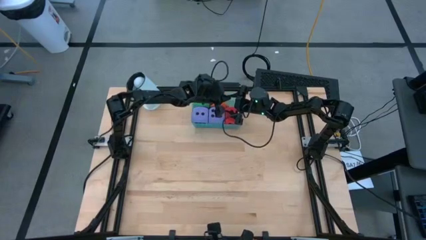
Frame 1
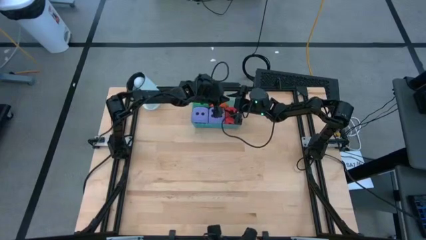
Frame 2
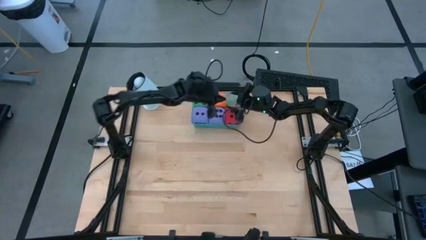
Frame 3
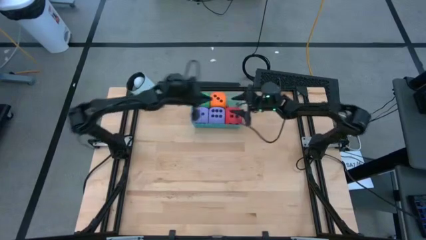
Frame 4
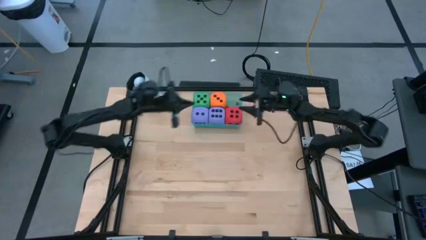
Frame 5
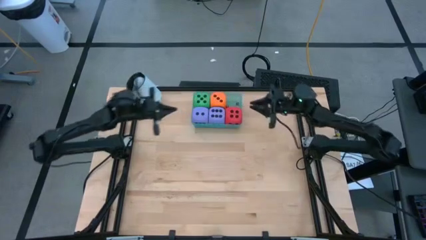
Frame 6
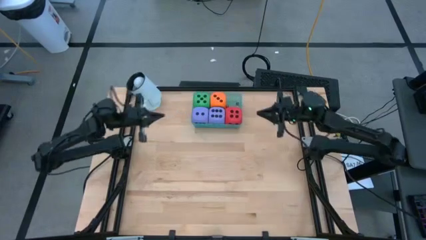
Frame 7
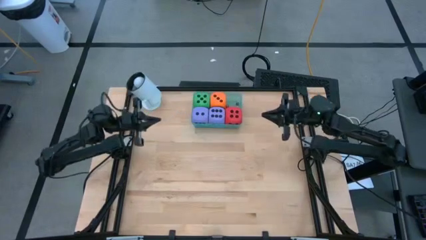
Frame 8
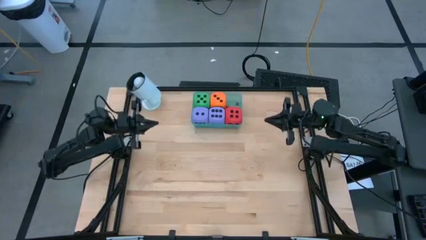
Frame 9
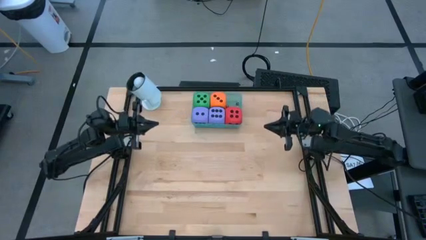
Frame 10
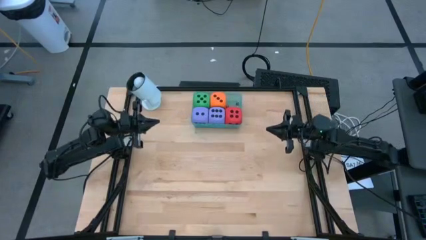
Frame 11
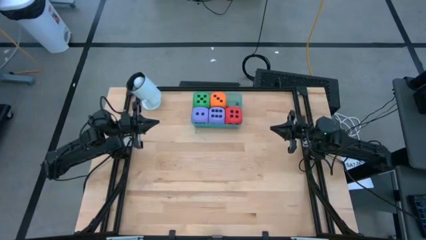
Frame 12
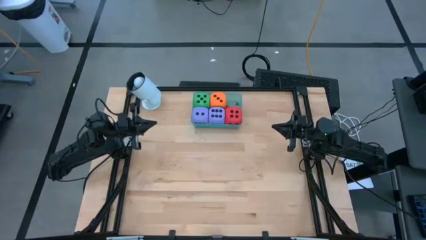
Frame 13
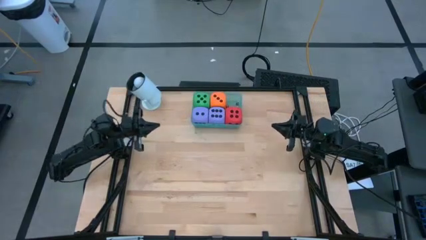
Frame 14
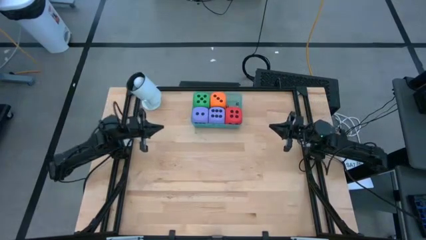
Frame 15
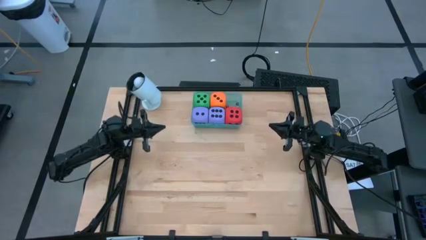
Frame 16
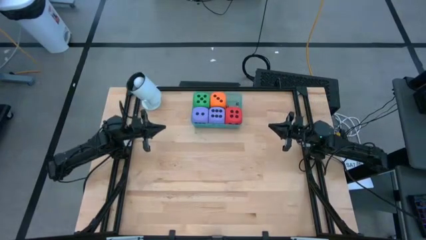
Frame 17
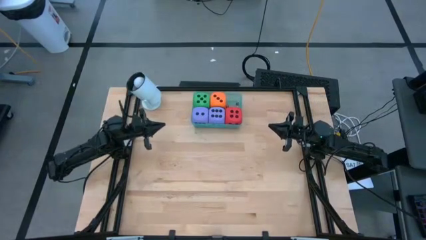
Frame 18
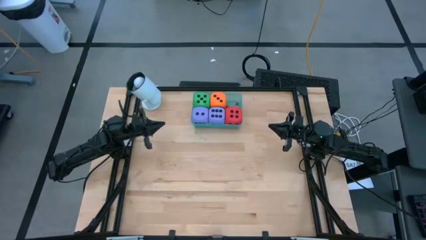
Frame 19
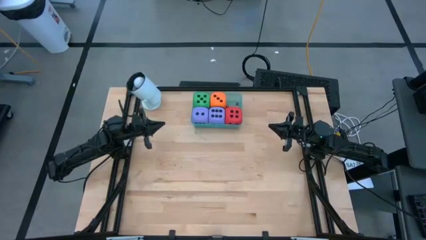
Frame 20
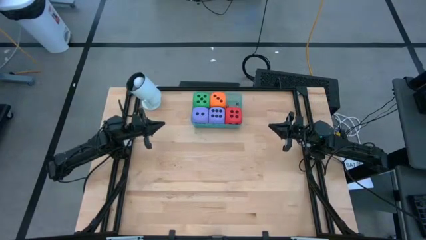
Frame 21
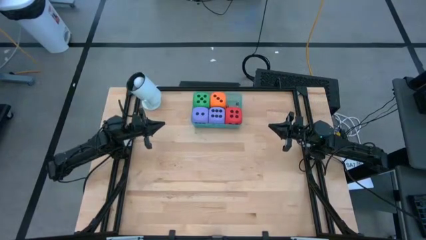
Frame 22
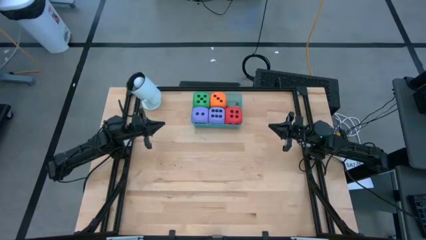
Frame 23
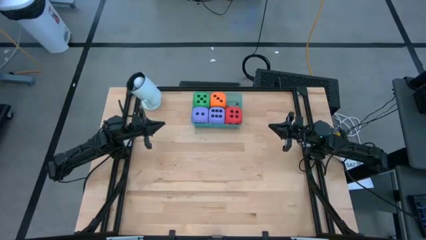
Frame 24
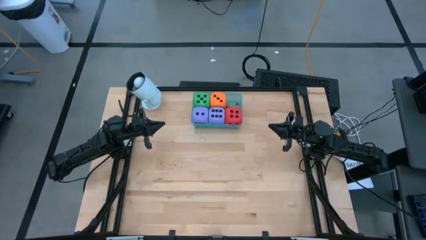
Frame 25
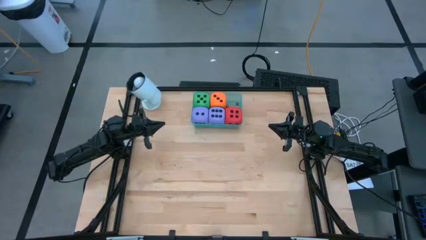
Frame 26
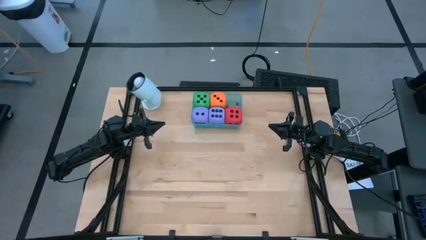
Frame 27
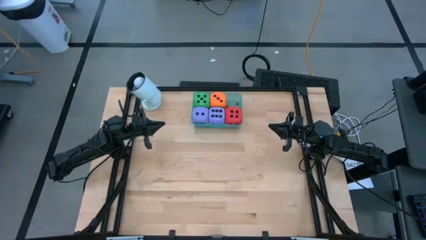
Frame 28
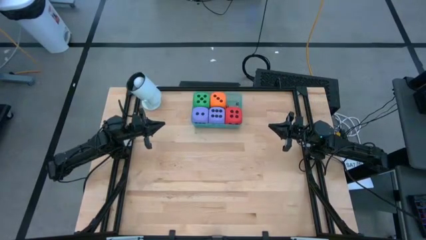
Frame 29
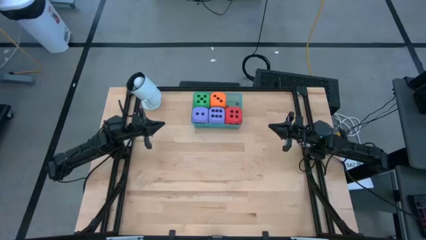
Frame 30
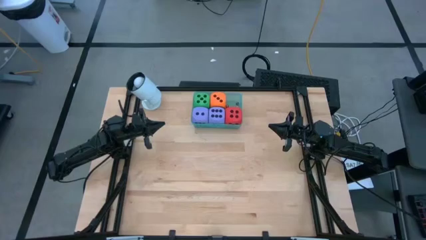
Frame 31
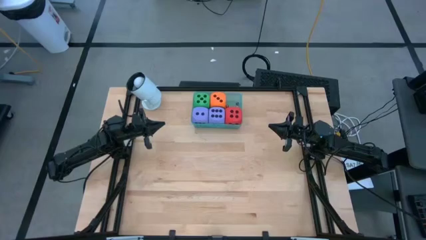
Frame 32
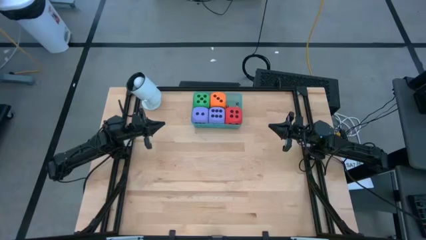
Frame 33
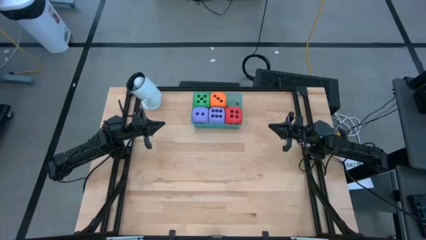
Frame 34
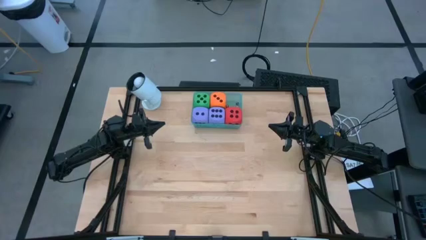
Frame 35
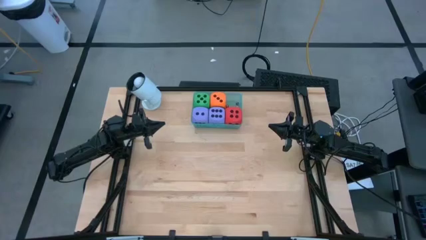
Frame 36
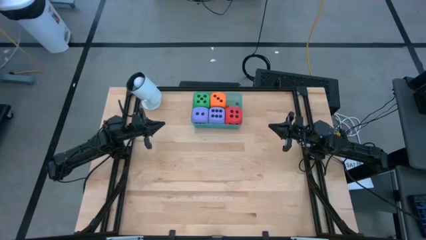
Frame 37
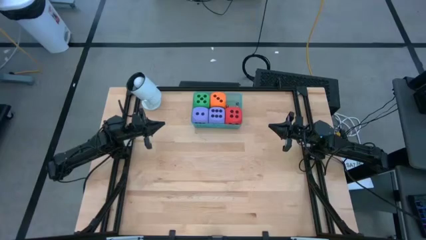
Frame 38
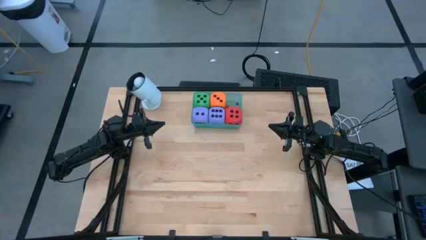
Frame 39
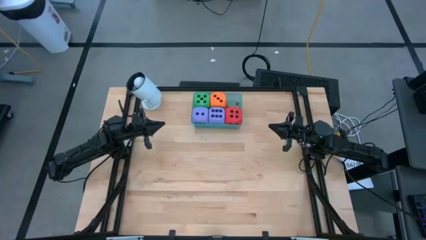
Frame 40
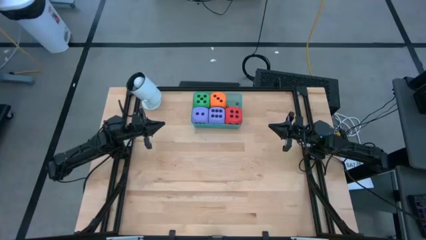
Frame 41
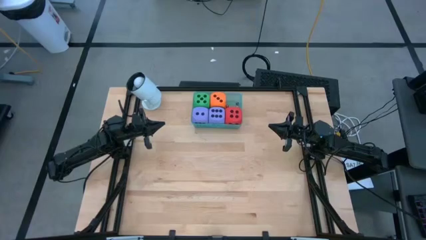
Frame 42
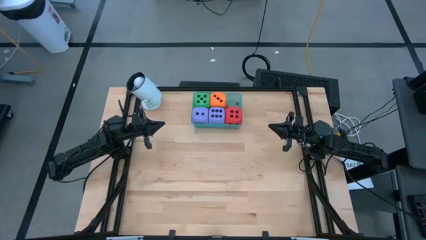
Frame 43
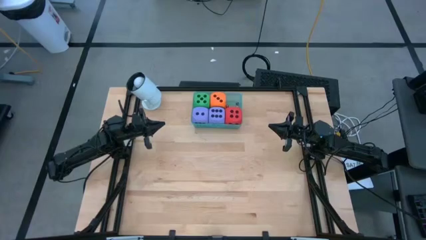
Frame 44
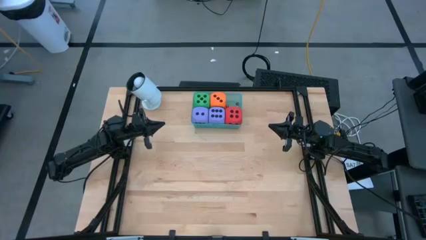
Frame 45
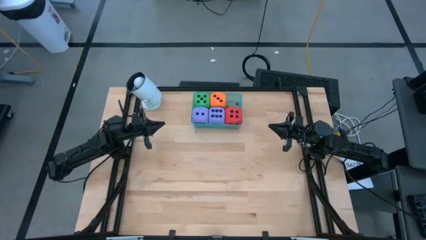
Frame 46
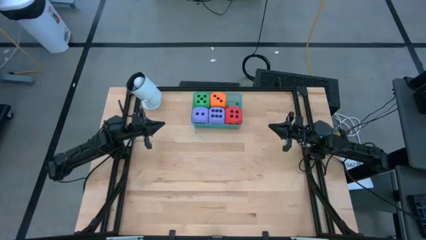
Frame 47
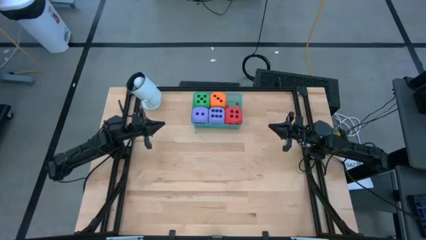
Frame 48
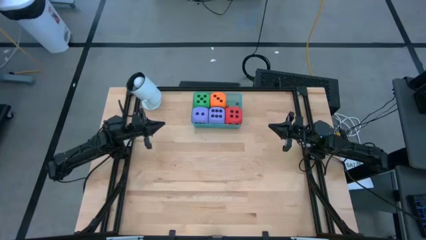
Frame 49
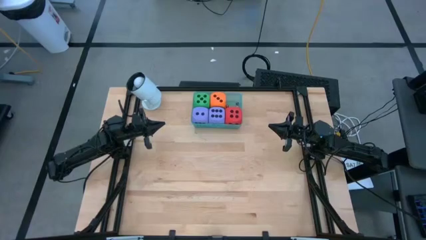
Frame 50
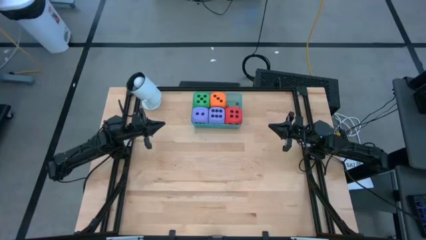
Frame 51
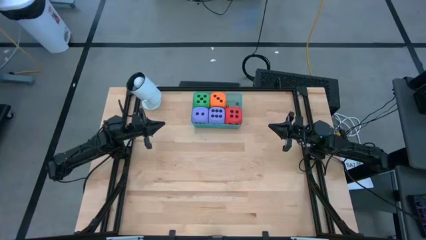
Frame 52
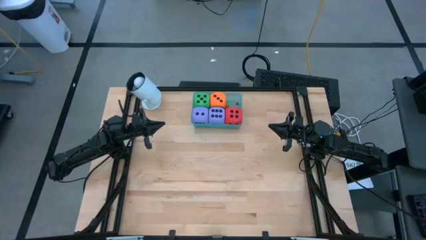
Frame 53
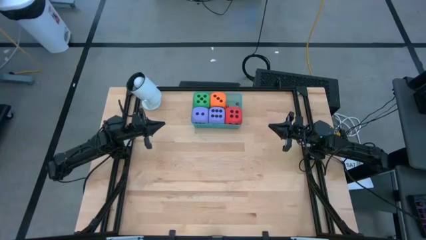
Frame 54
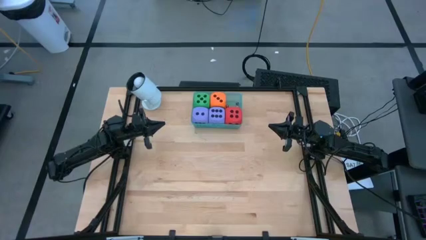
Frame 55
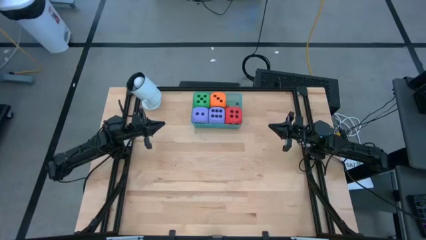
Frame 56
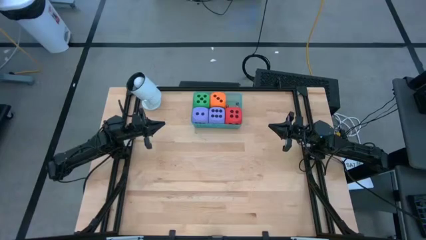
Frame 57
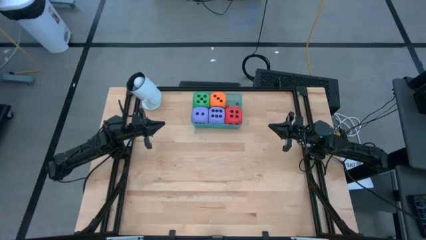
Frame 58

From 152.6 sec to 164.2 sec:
Task: Pick & Place Dice
Return to Home Position
